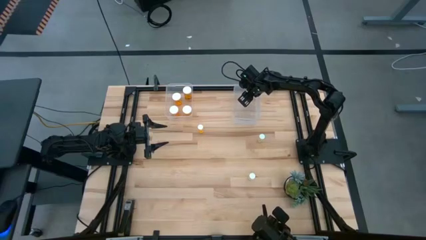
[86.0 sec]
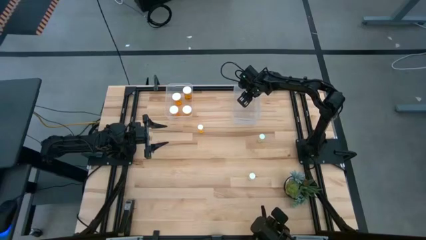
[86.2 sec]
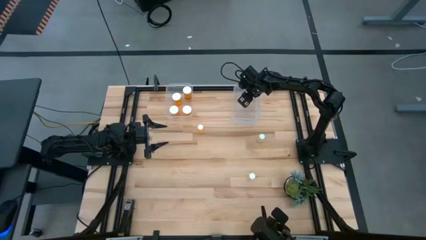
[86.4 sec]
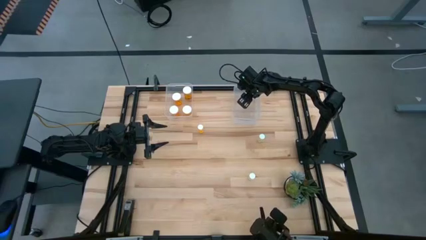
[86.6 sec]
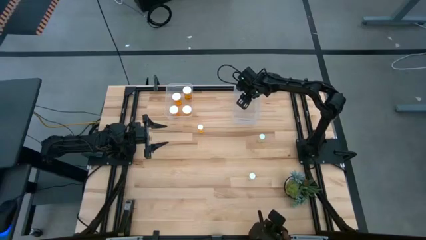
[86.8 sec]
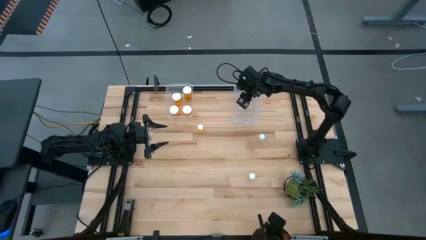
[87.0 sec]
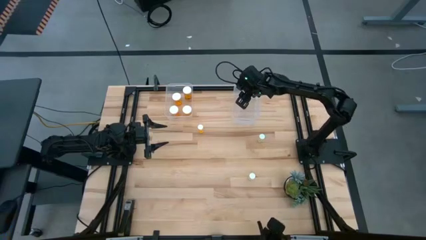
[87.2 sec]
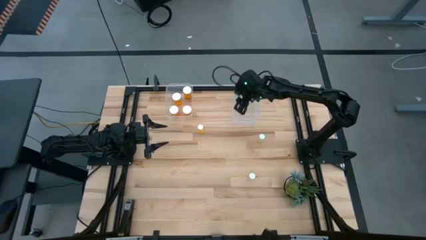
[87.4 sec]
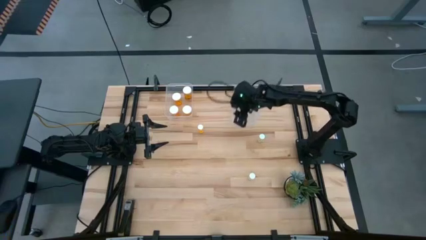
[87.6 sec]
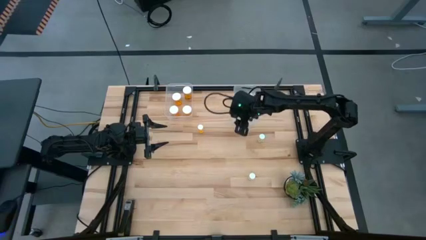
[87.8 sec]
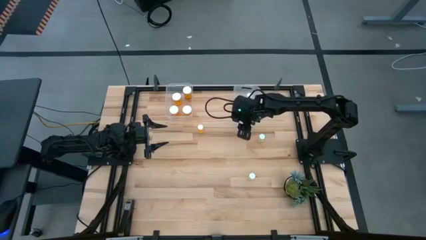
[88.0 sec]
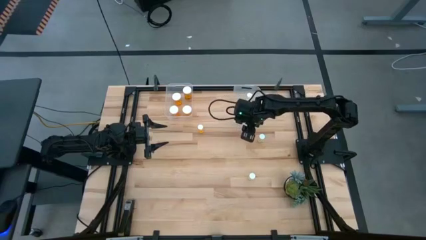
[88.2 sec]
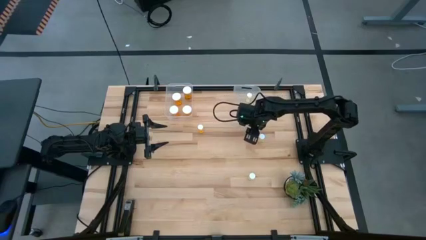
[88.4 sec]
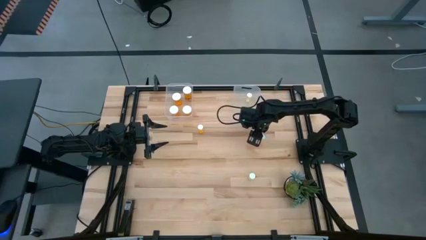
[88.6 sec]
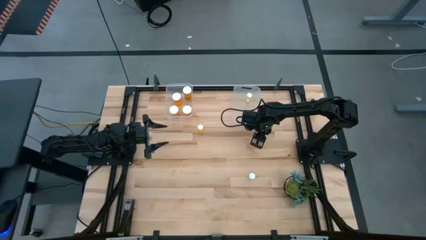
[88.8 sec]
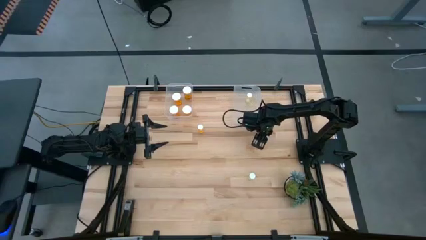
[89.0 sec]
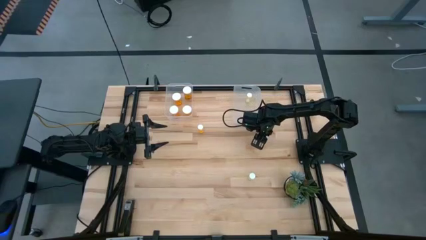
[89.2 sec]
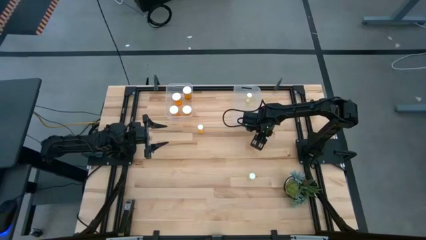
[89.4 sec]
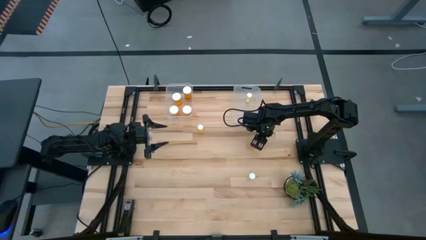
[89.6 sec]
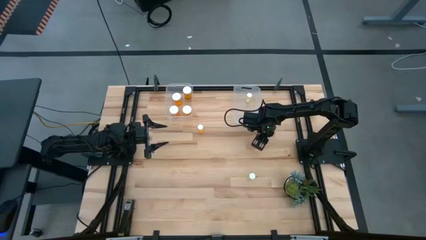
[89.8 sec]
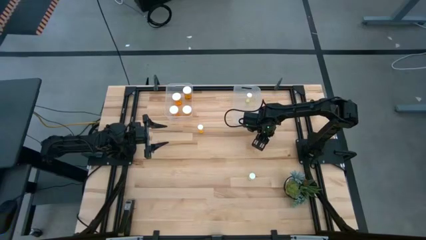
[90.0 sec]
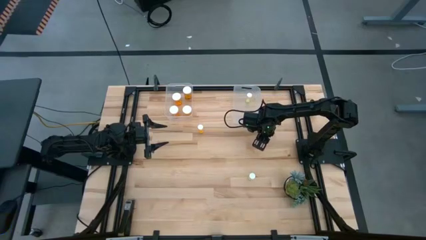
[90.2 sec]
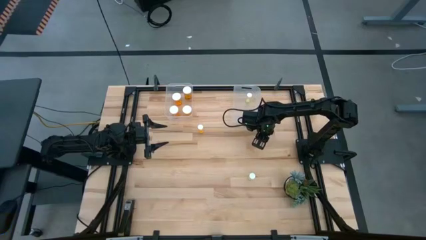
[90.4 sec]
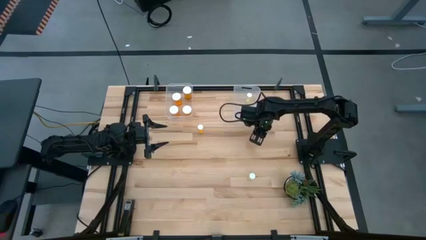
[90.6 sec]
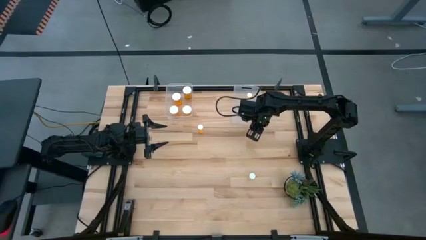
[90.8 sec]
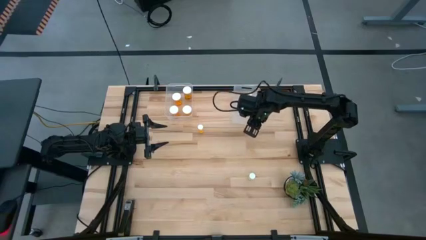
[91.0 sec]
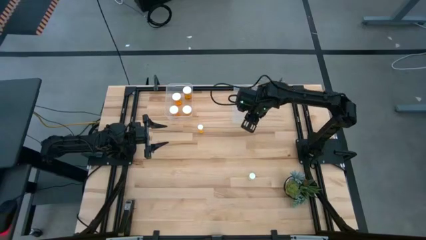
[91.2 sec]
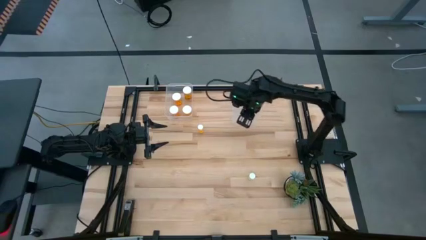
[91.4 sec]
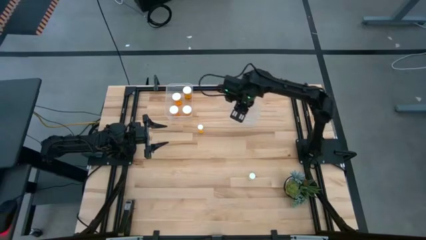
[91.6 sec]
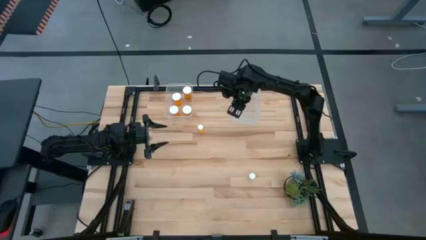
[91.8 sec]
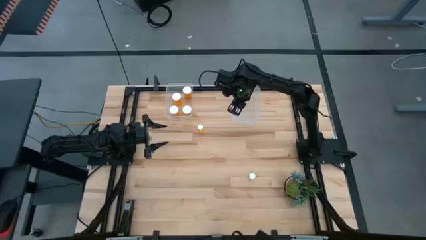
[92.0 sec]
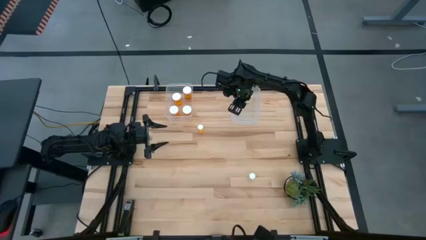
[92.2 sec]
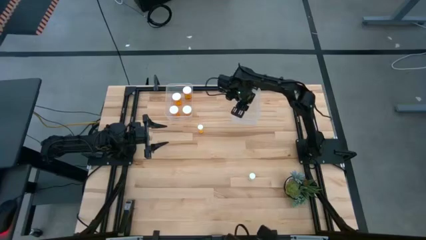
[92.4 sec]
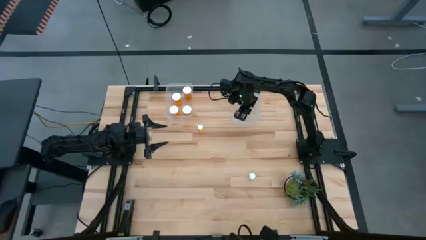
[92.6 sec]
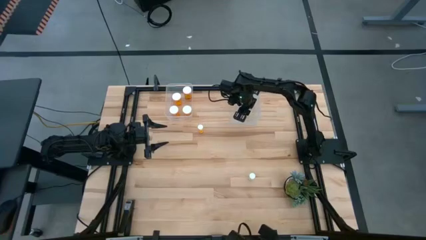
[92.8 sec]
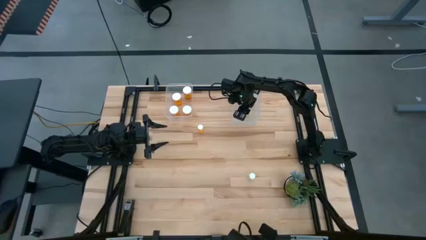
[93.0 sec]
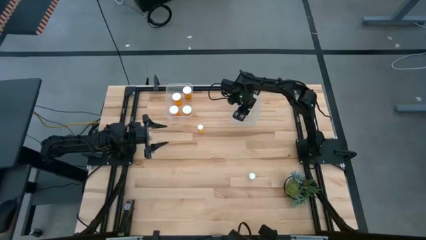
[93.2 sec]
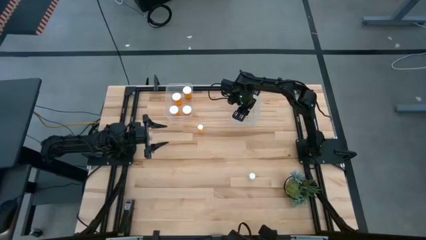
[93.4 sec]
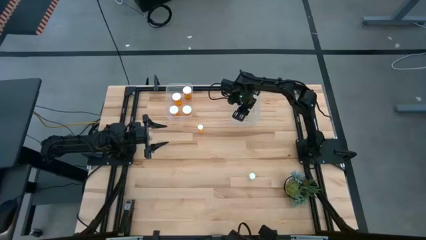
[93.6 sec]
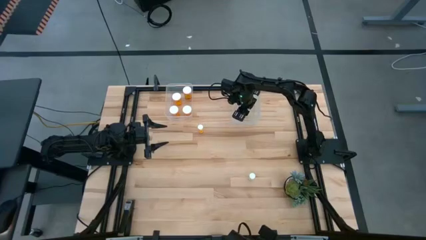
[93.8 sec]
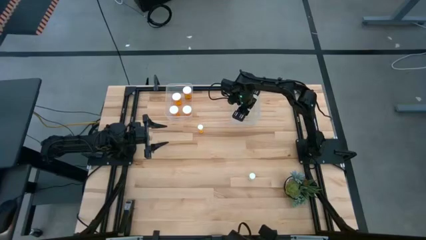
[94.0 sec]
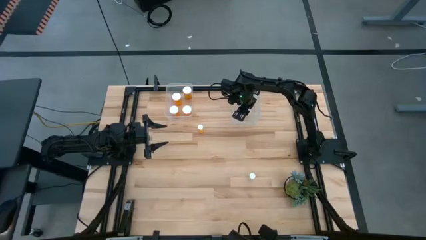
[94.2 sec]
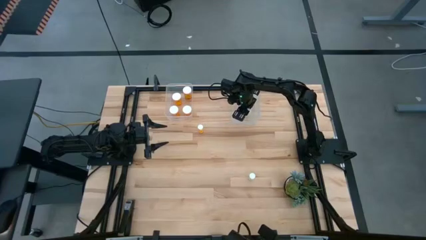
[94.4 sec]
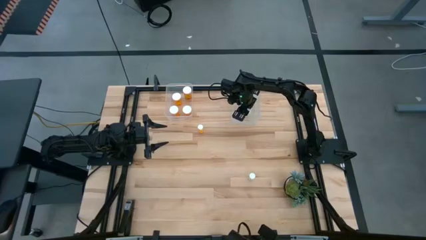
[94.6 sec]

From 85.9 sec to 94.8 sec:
Task: Pick and place medicine bottles into bin by pill shape (circle, oval)
Put the small yellow pill bottle into the right transparent bin

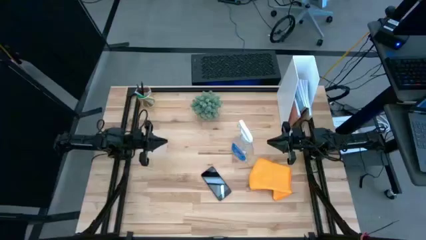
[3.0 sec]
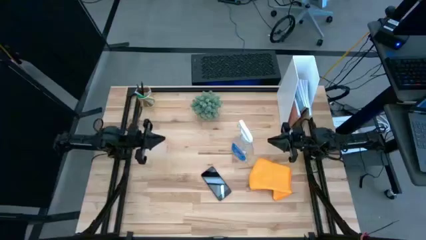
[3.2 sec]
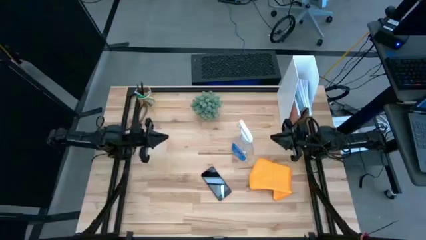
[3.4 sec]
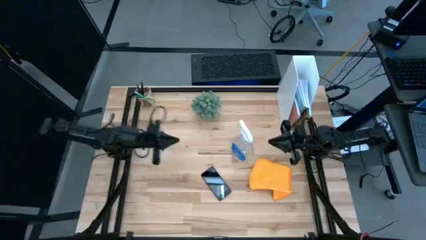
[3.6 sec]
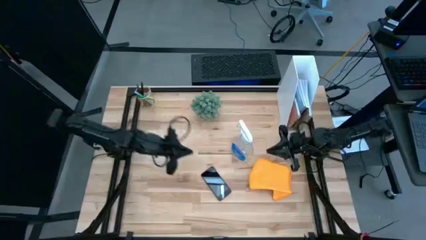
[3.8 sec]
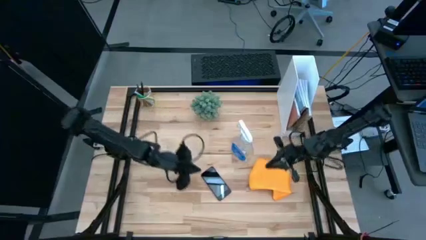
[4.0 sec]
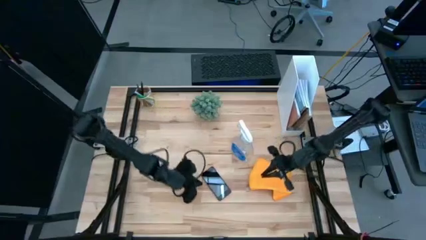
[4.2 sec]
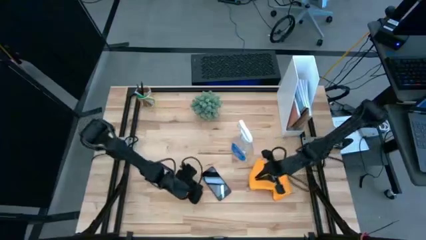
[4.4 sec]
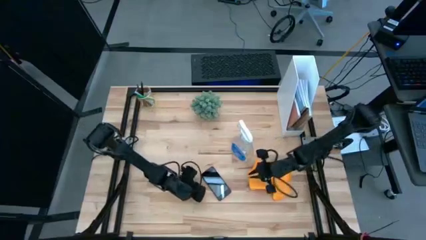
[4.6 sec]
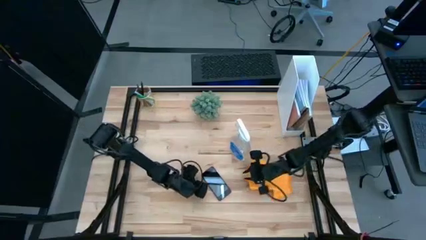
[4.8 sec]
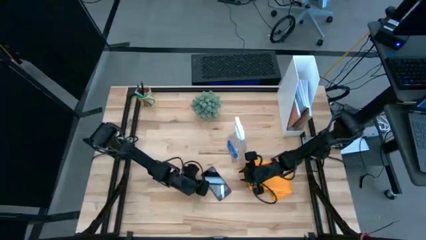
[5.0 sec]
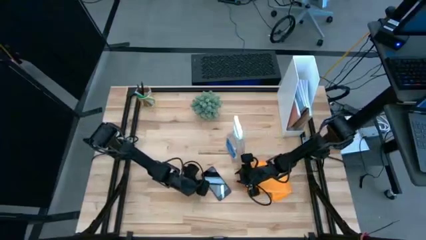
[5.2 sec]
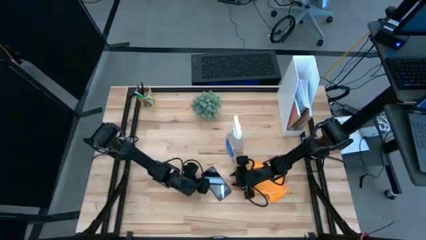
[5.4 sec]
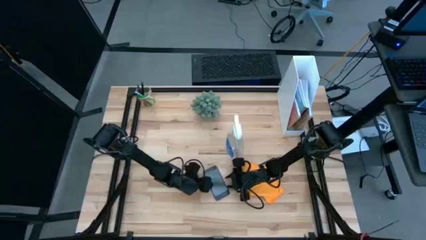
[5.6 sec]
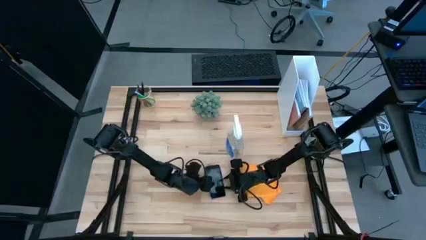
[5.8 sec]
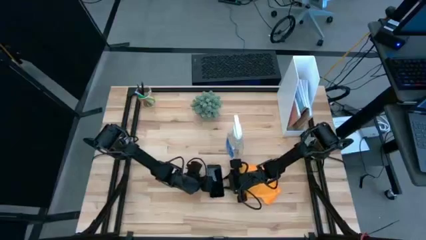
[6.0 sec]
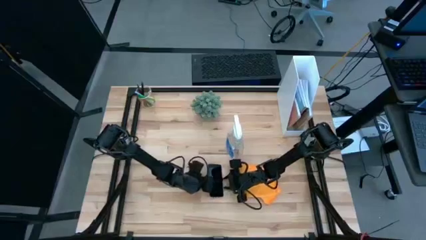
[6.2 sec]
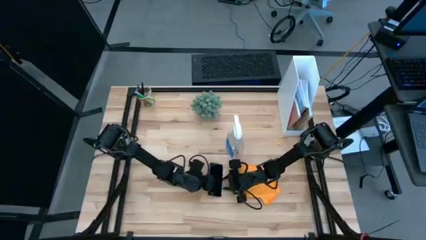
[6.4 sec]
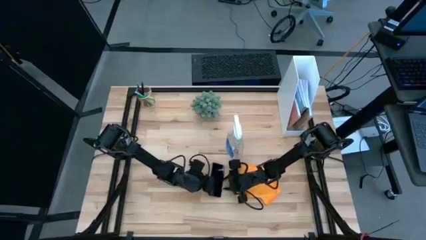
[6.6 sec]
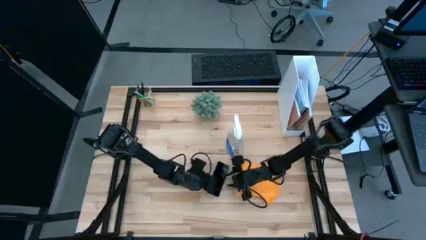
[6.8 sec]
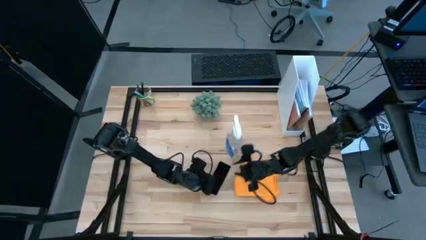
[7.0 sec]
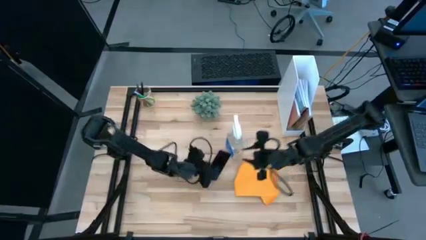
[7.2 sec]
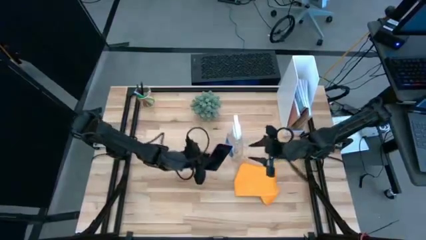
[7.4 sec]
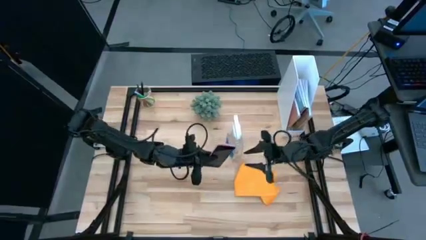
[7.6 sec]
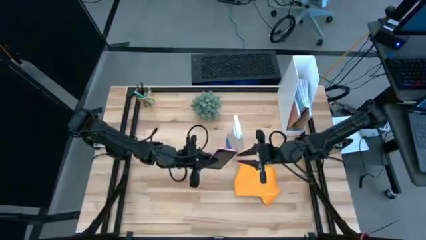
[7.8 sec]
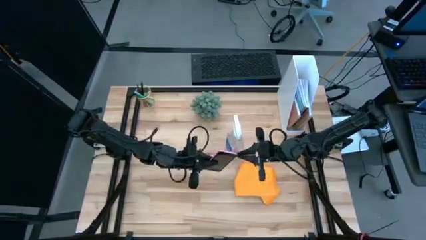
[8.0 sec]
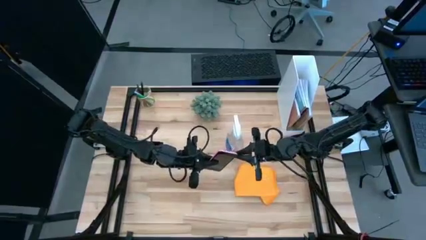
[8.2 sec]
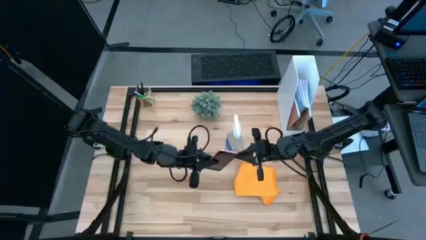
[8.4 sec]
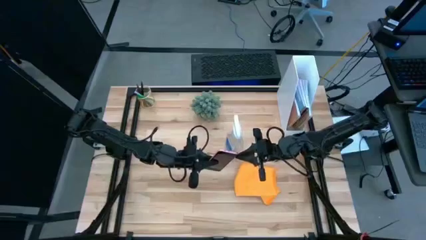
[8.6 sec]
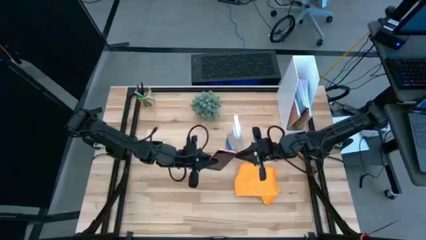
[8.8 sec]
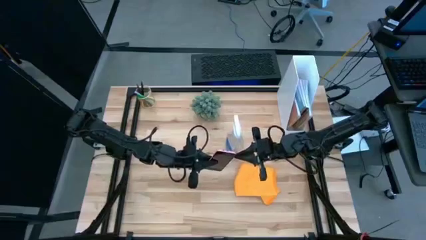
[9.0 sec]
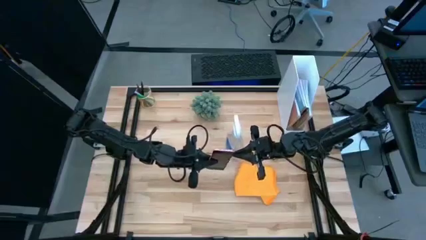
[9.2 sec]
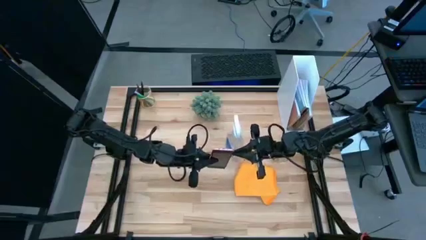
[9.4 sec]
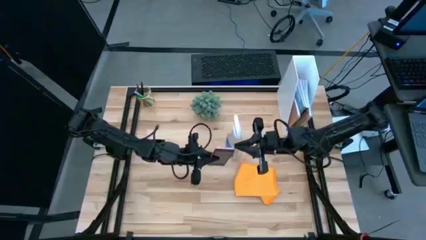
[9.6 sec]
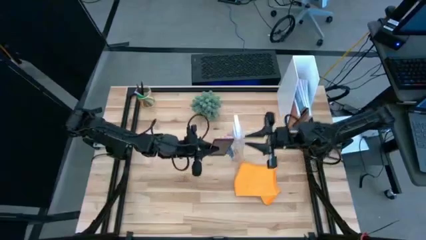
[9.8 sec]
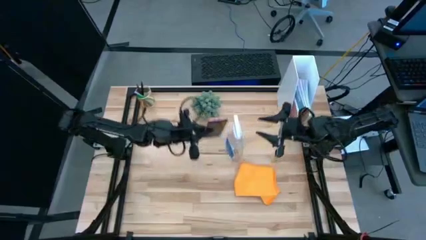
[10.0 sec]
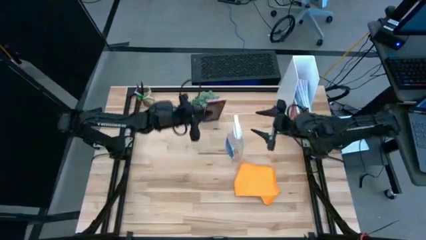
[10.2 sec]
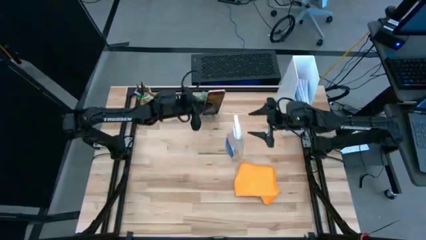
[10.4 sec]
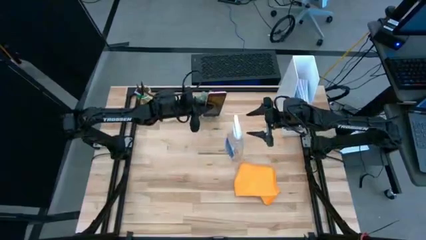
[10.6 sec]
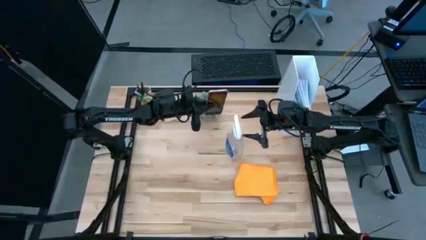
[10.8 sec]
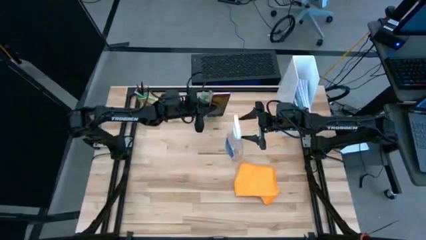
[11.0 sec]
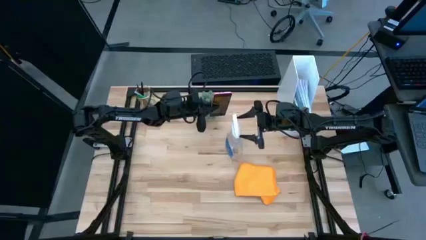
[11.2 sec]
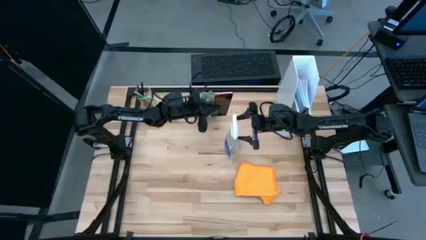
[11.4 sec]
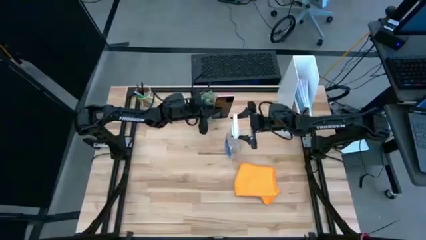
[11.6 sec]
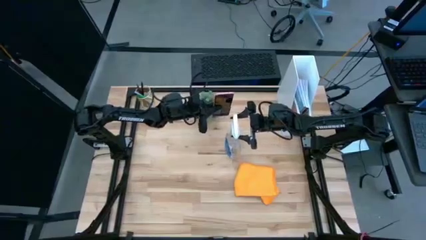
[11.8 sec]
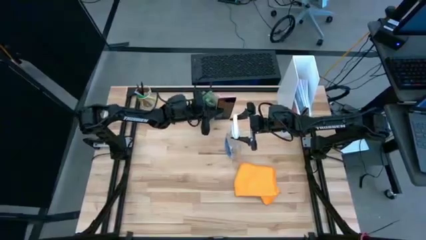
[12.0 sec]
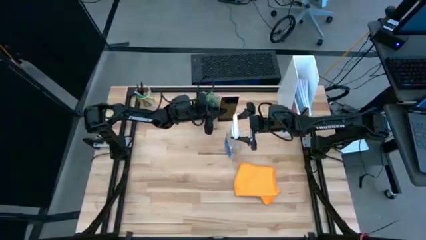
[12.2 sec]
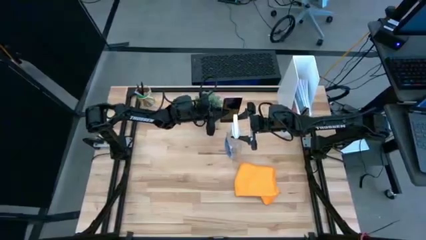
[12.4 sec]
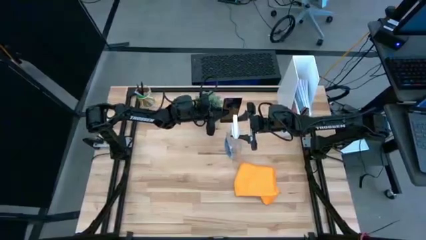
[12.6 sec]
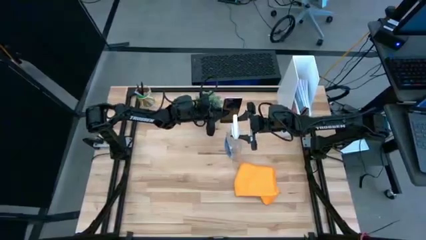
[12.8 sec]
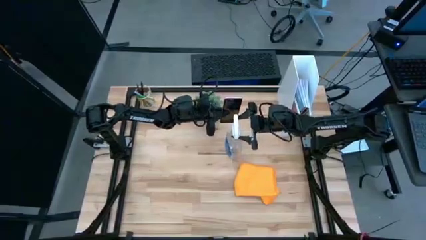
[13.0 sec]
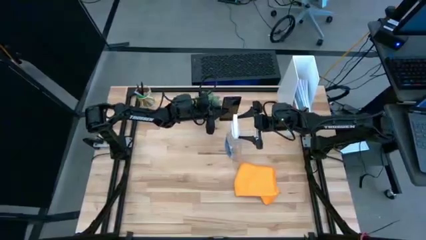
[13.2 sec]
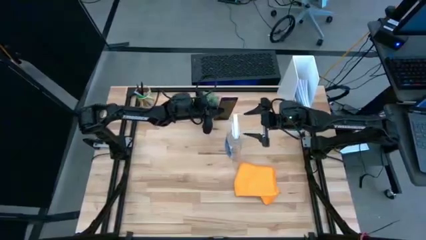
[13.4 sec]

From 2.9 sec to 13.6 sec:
Task: Apply microfiber cloth
Spray cleaner from the bottle onto the cellphone
